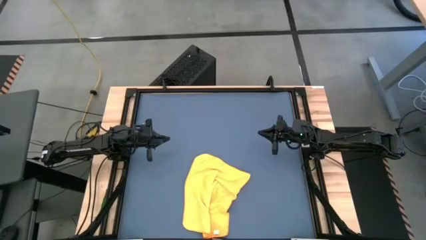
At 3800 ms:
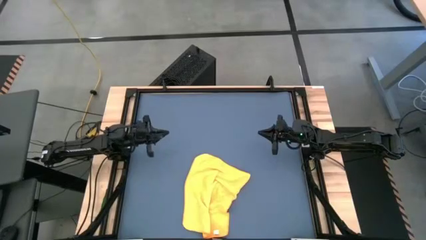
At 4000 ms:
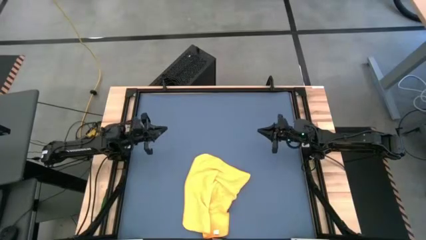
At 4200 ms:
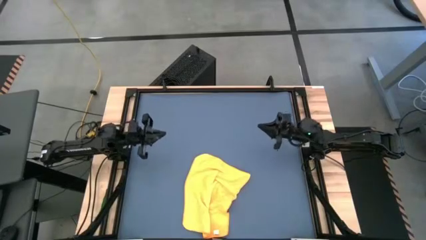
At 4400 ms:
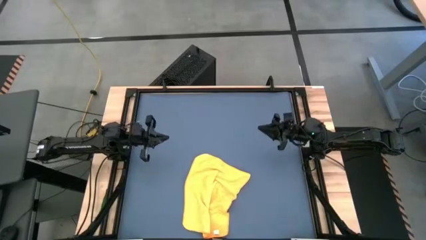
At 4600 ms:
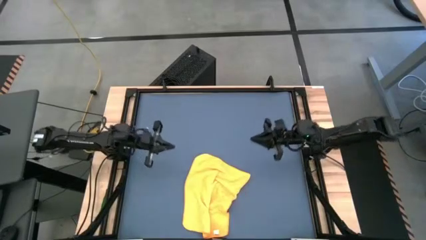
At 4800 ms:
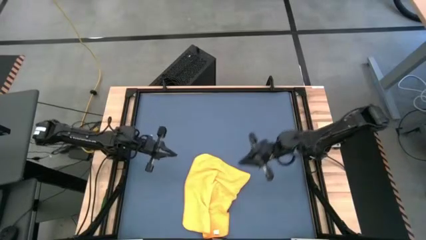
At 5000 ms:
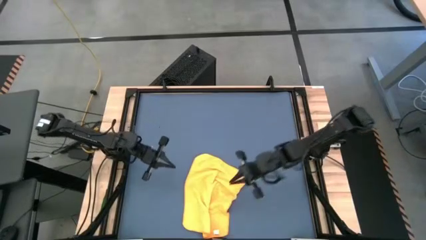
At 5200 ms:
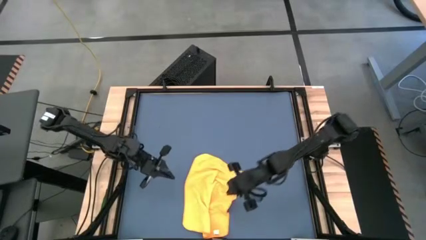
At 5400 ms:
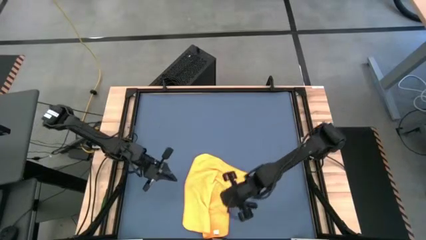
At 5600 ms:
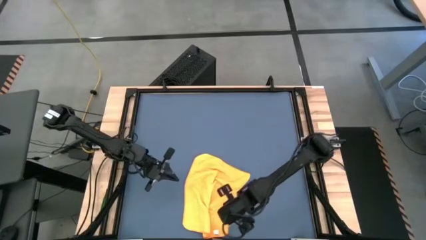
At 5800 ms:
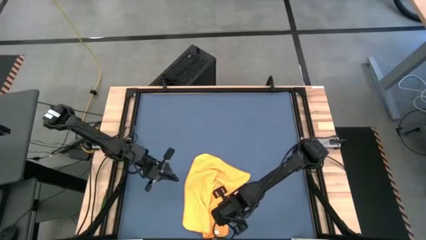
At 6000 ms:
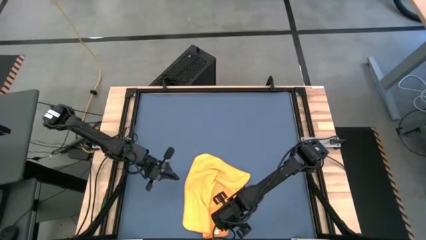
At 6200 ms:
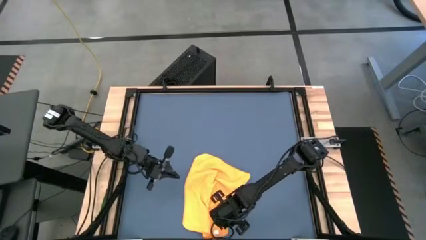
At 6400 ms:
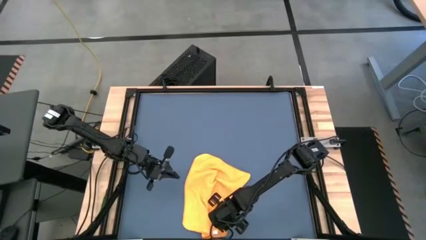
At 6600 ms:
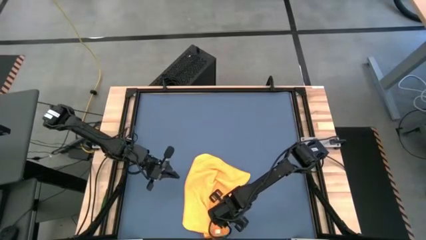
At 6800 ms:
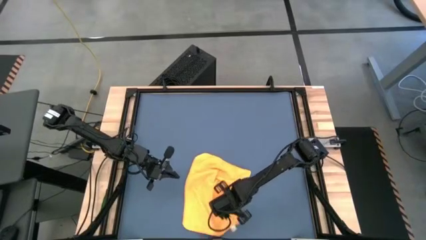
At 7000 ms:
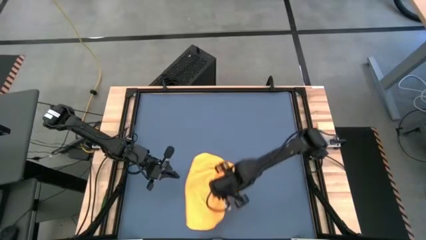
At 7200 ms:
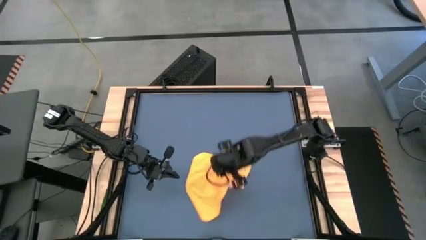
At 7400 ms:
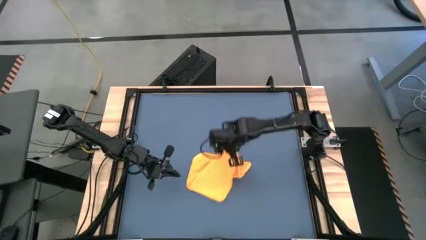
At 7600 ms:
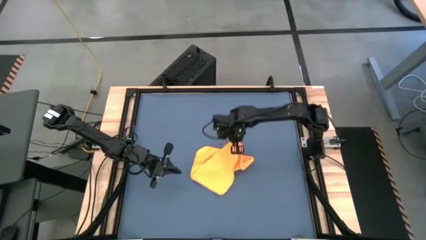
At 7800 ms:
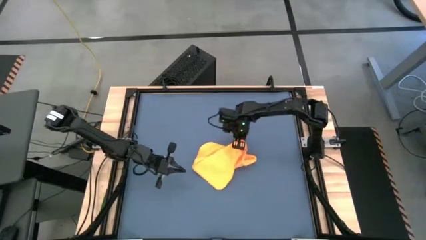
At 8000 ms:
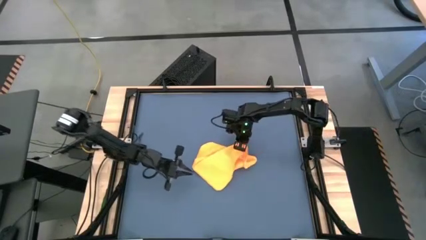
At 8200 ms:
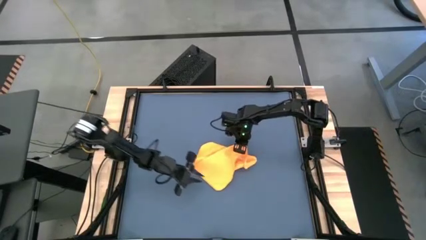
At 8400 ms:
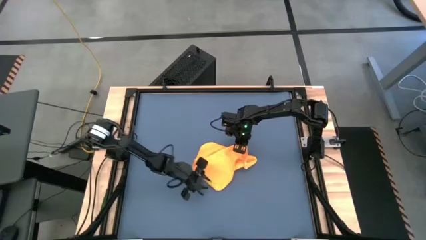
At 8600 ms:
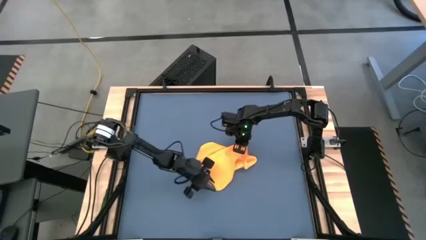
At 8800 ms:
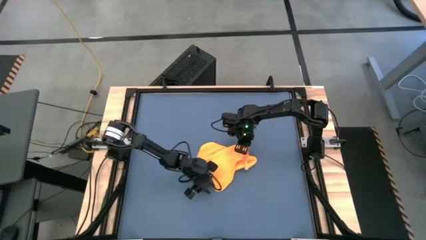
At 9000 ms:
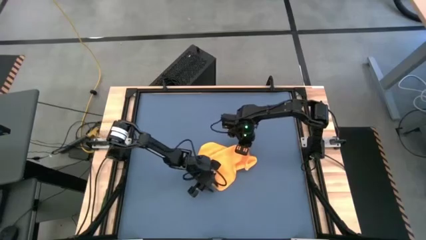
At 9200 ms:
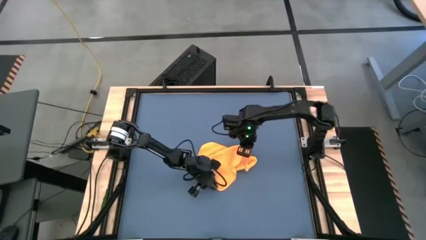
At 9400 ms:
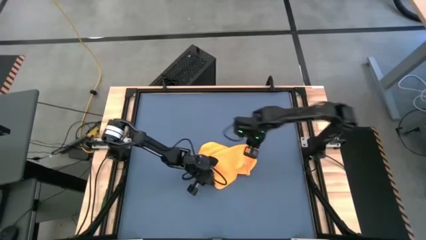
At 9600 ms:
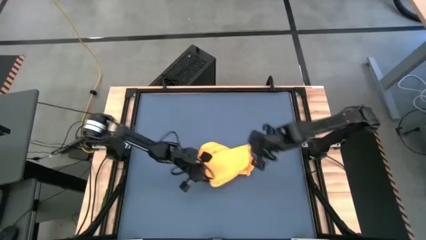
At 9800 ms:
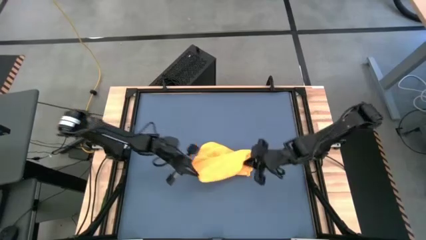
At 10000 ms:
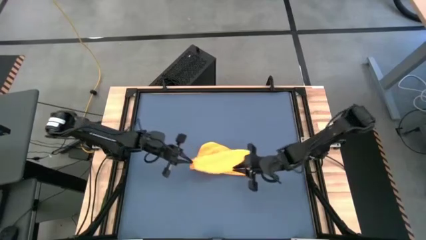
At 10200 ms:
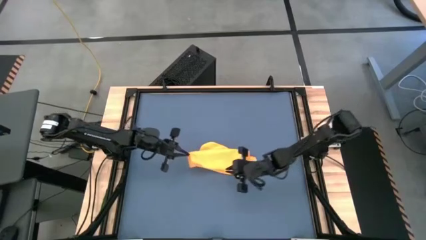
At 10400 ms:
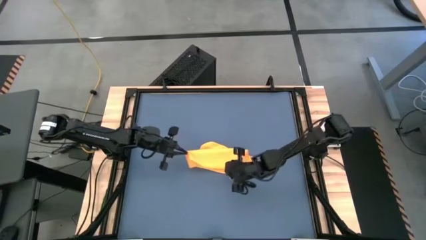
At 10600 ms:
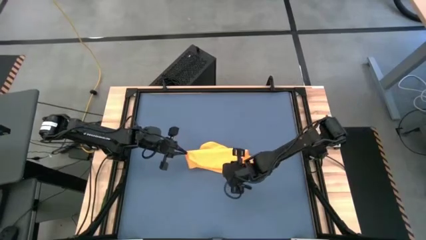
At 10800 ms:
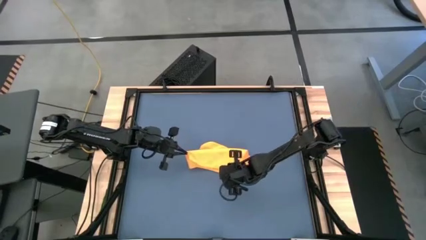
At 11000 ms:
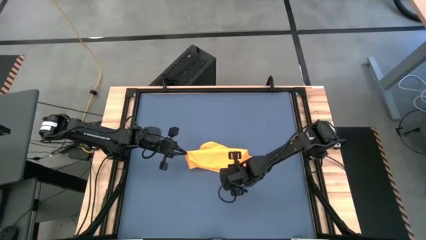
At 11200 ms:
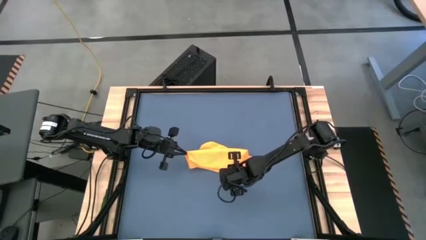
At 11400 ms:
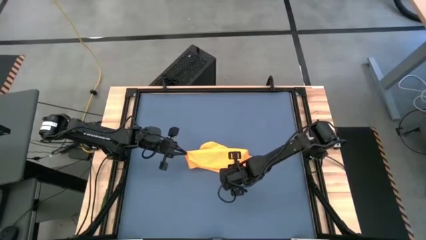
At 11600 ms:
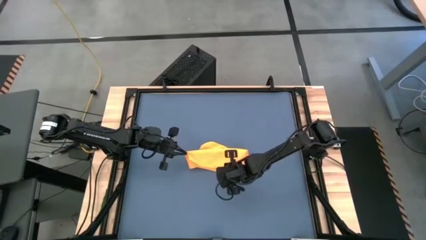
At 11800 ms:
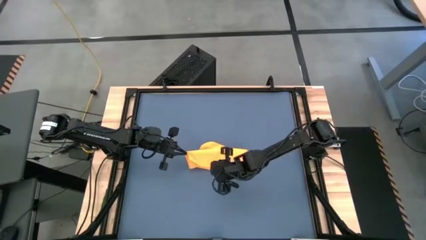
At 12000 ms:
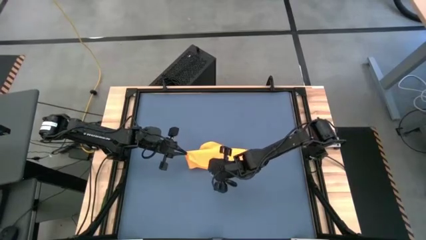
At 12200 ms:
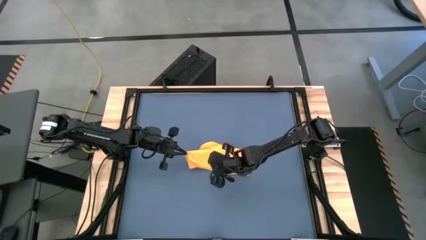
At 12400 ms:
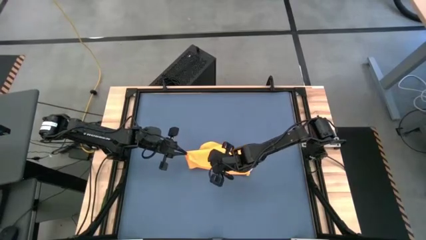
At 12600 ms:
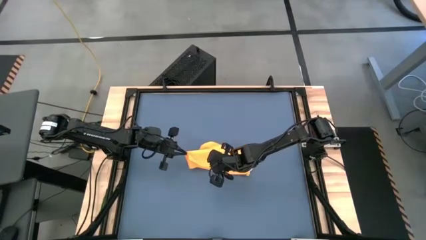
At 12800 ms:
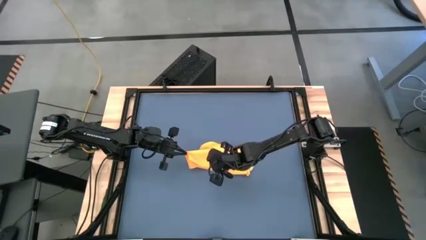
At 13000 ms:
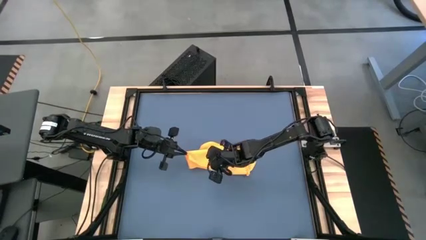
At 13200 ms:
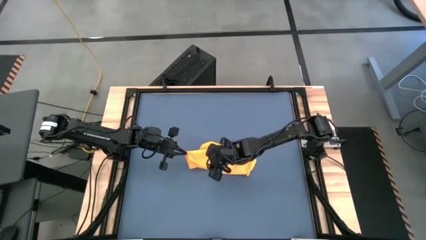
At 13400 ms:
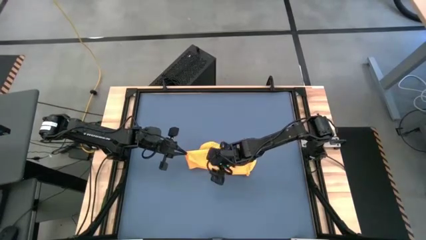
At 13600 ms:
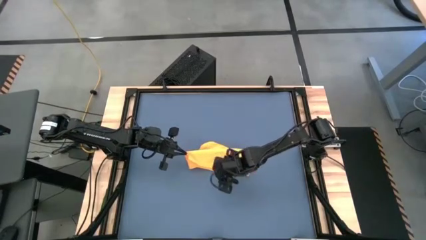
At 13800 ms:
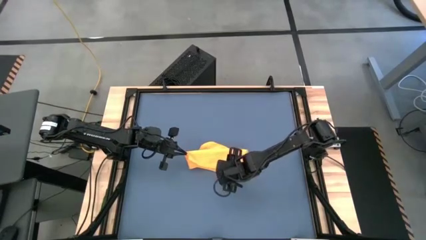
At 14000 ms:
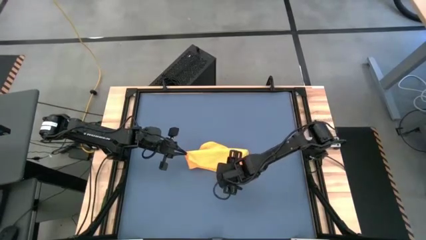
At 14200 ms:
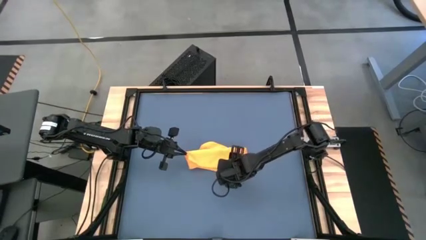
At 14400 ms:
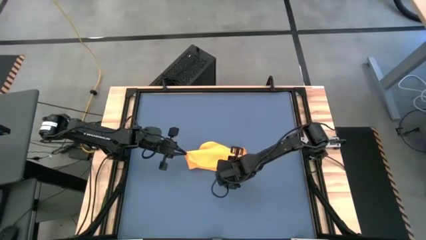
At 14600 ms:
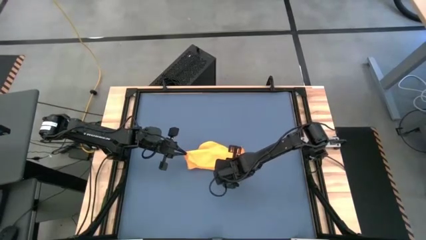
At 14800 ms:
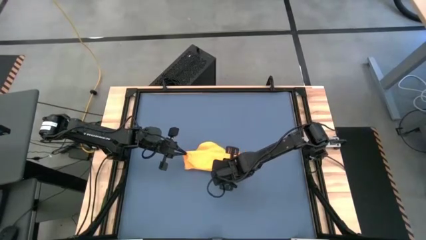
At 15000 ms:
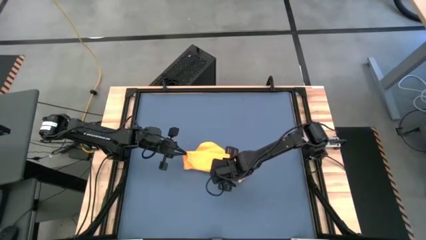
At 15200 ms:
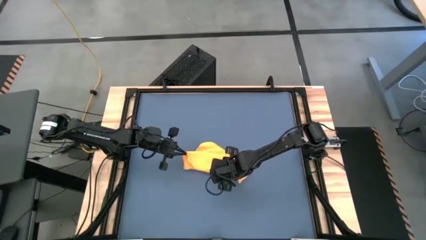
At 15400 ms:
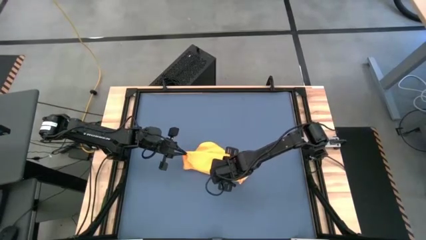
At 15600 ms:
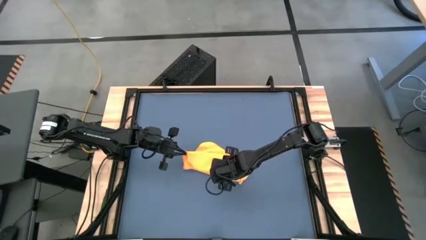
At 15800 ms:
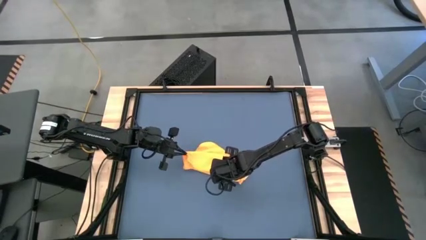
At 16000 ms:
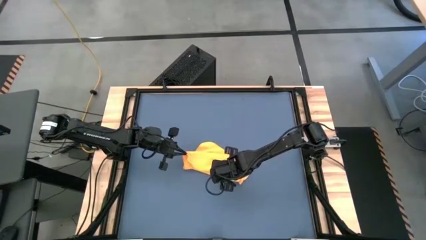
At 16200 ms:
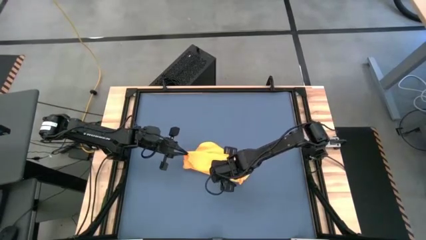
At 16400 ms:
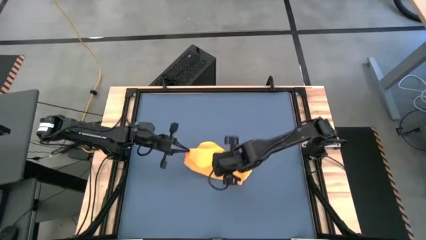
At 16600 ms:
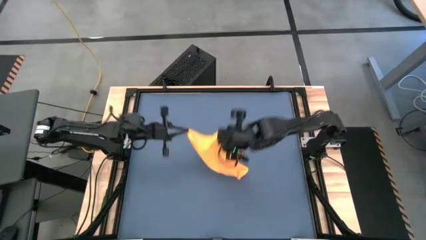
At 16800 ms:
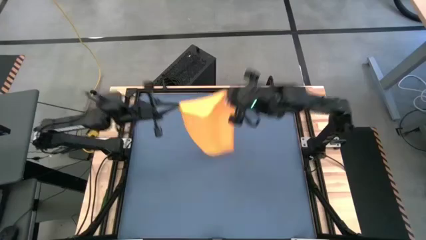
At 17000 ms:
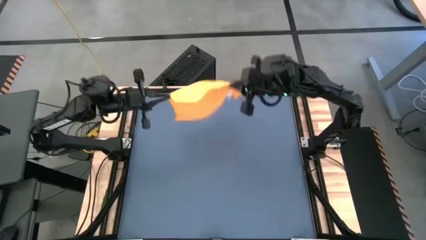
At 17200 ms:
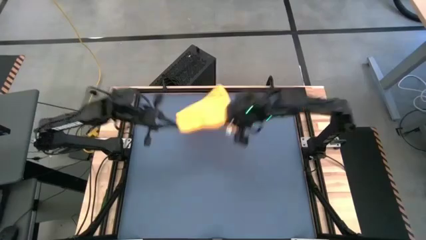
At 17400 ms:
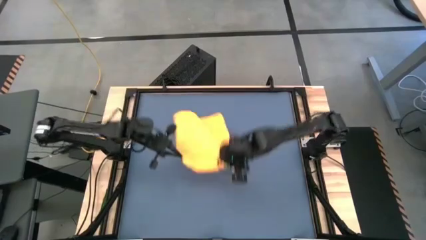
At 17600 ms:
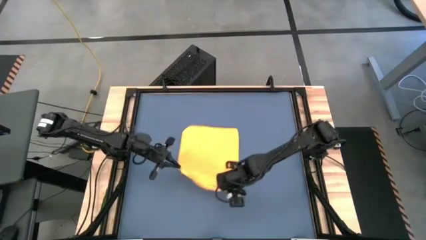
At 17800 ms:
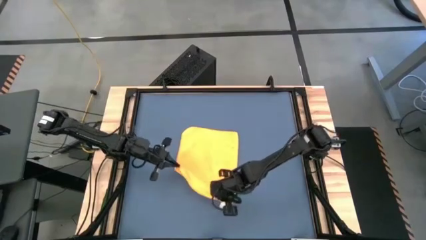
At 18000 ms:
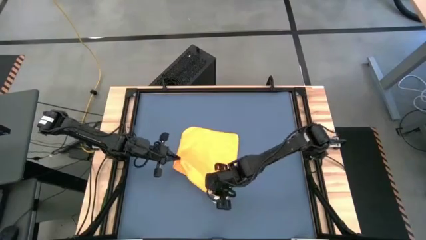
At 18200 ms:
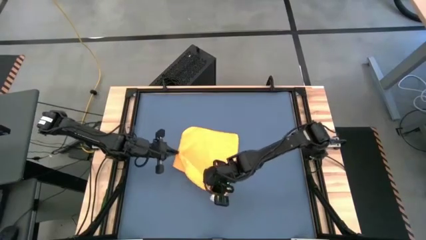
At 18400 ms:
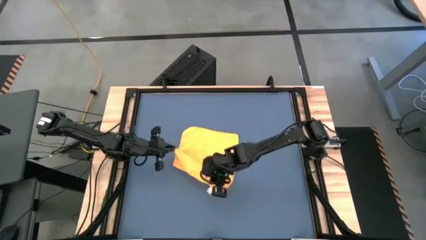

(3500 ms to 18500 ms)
Task: Roll towel
Fold the yellow microfiber cloth
